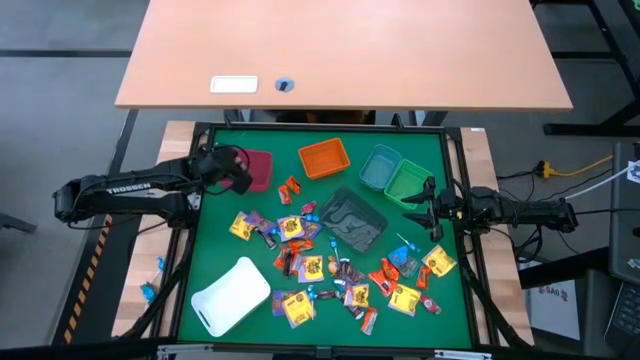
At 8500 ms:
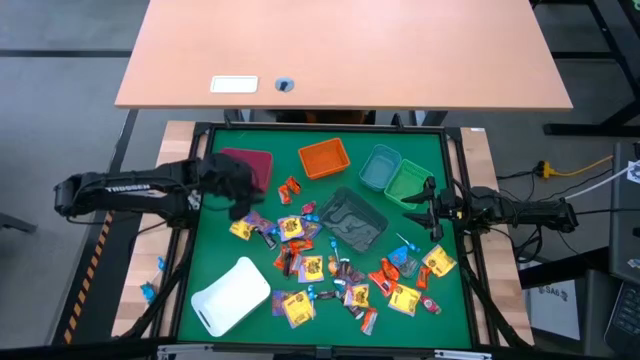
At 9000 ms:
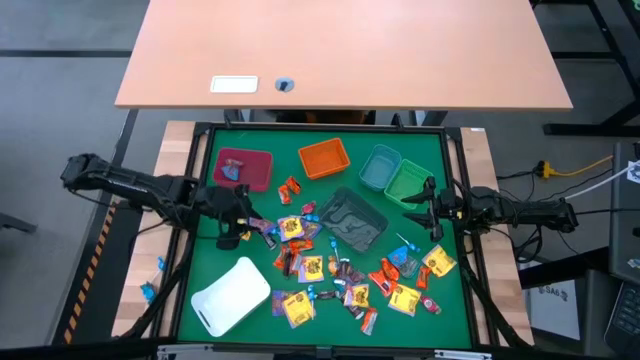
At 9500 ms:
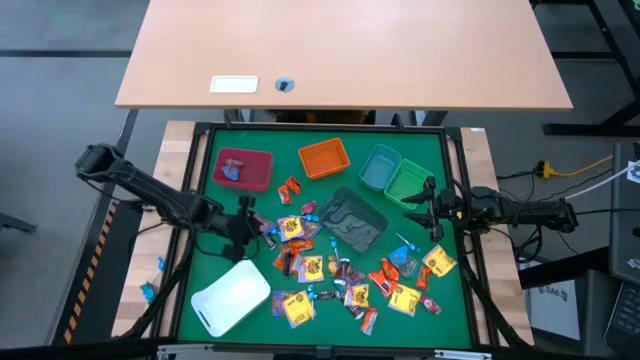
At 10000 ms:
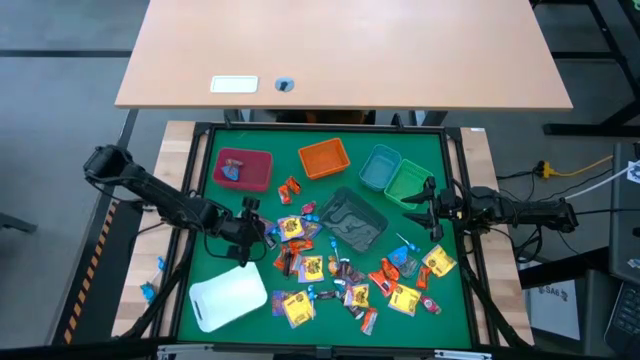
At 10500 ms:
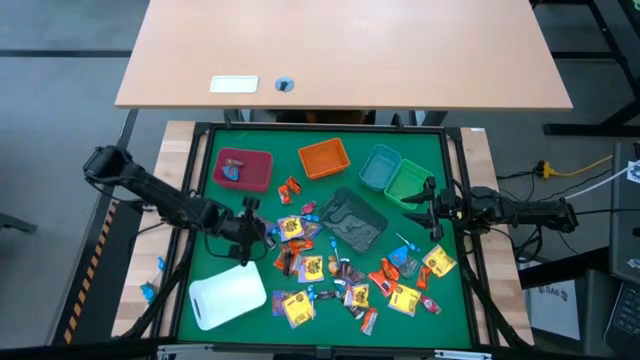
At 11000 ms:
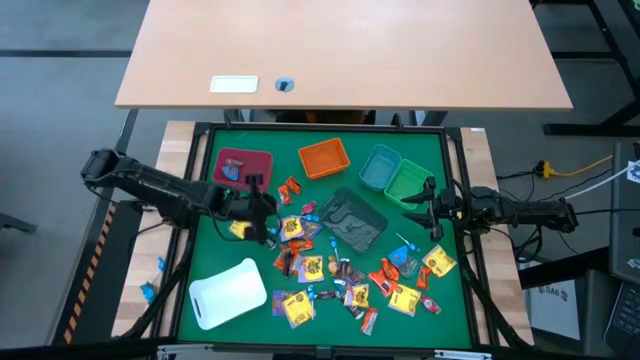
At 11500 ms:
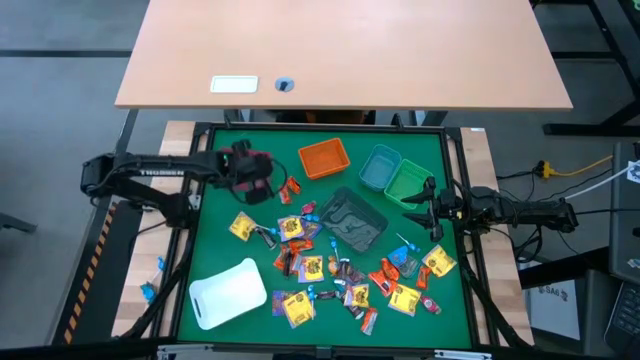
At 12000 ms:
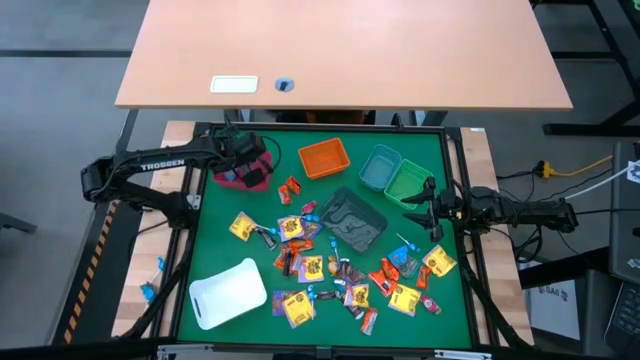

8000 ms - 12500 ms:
Task: Sort candy
Put the purple gummy pack into the red bin

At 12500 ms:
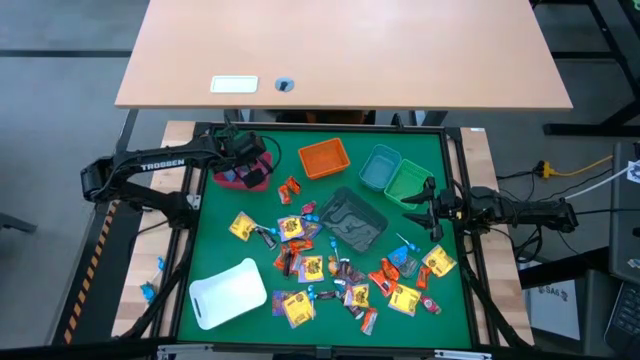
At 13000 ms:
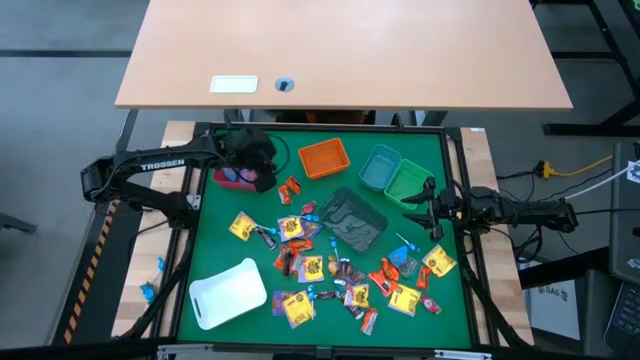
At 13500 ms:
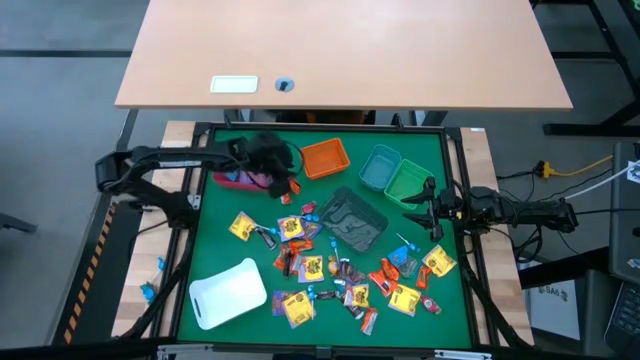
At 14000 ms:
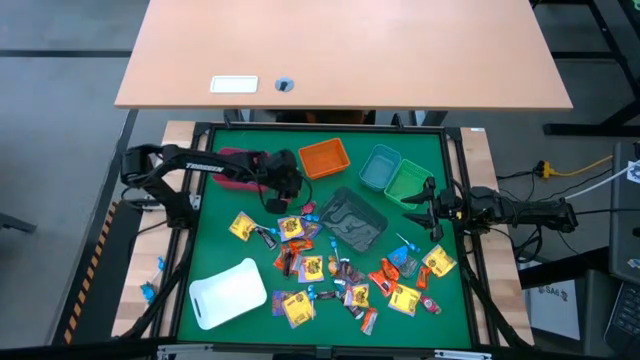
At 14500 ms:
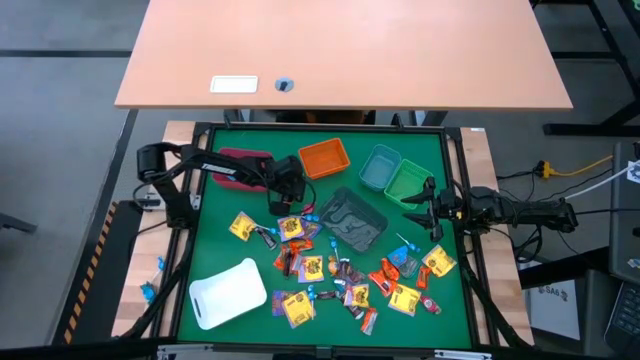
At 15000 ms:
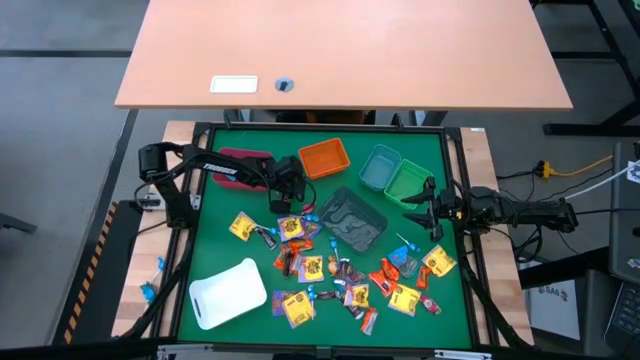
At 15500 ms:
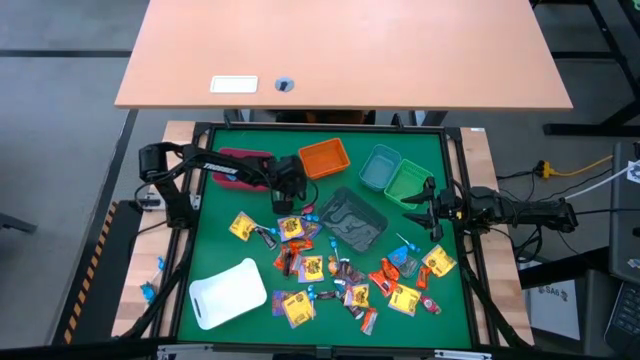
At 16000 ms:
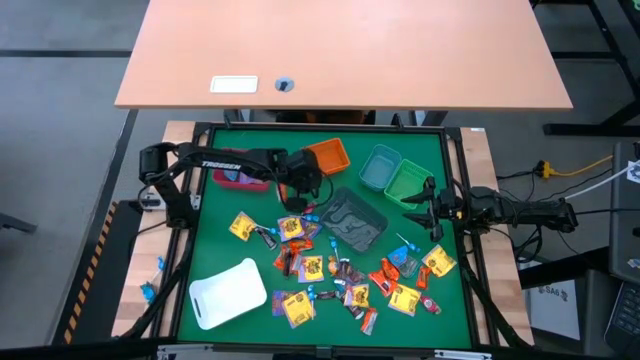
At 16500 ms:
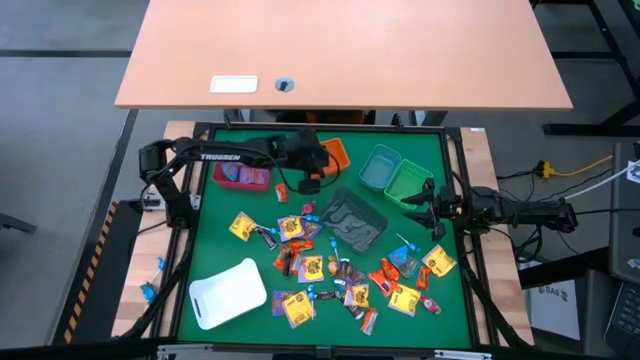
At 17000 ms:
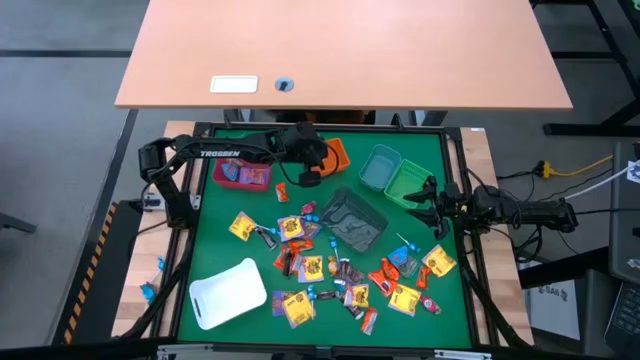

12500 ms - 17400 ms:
Put the orange chocolate into the orange bin

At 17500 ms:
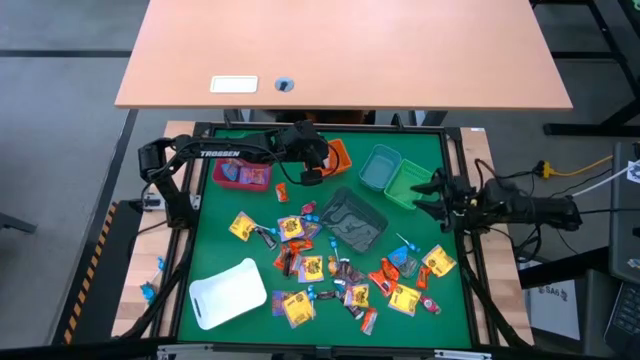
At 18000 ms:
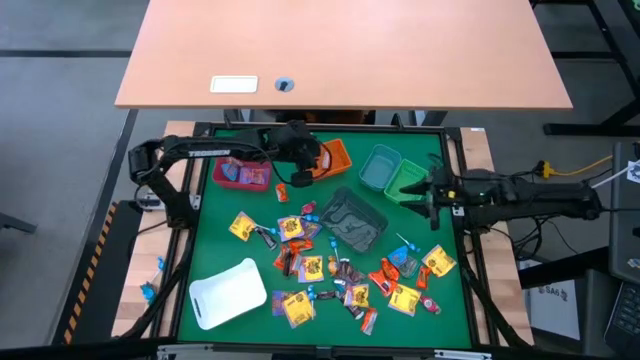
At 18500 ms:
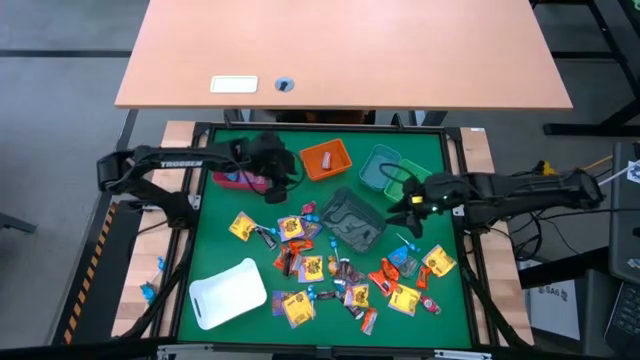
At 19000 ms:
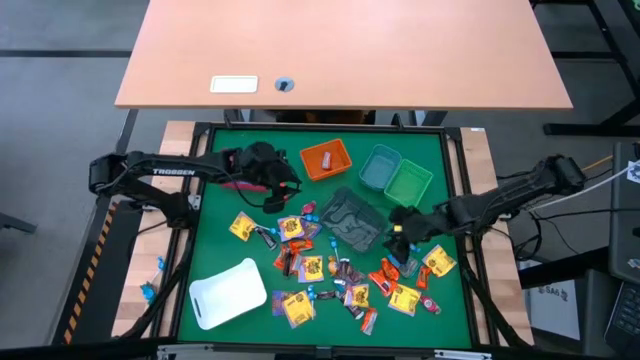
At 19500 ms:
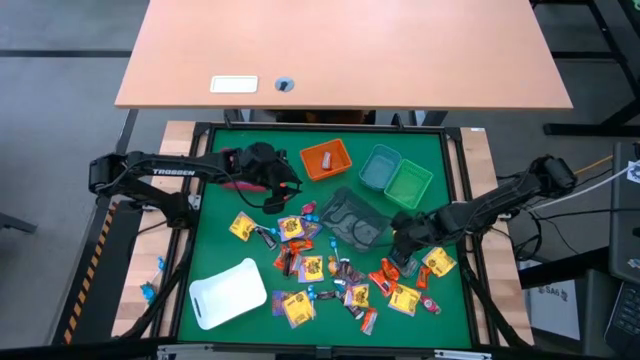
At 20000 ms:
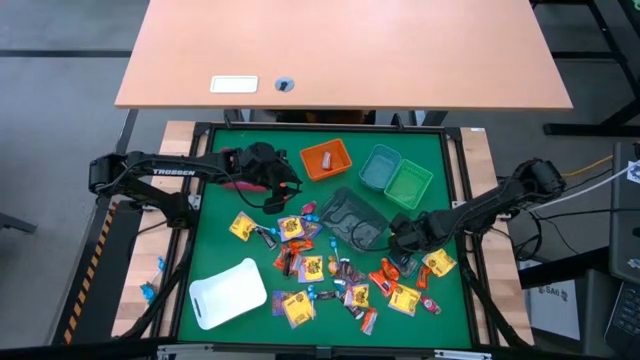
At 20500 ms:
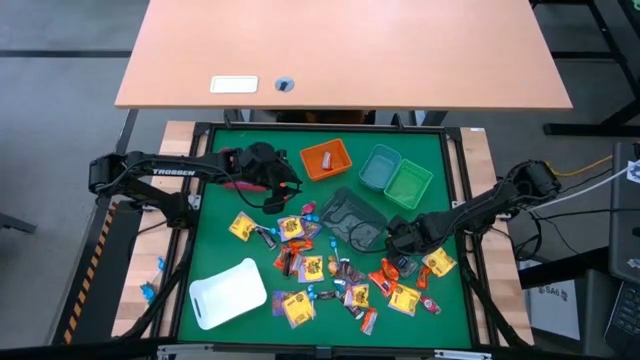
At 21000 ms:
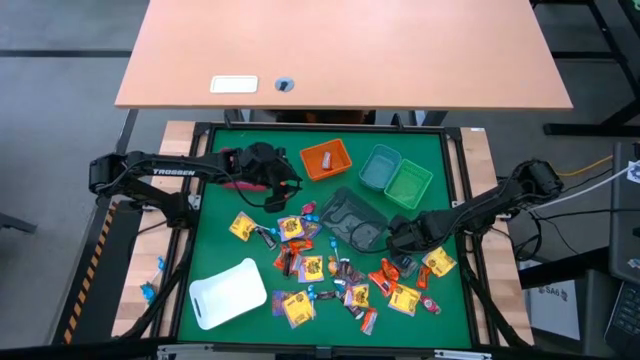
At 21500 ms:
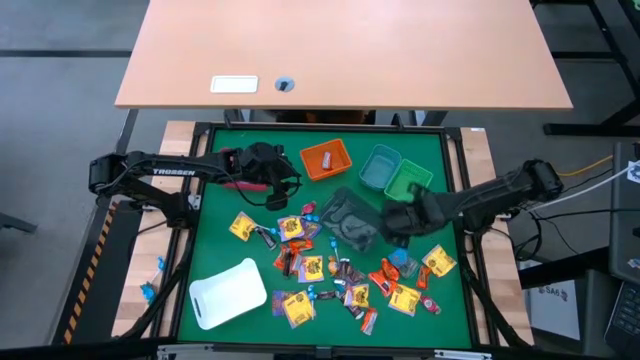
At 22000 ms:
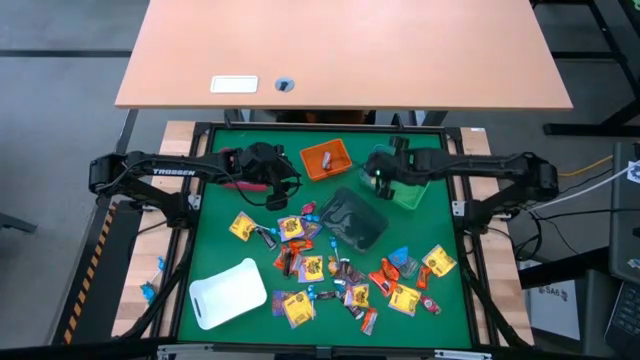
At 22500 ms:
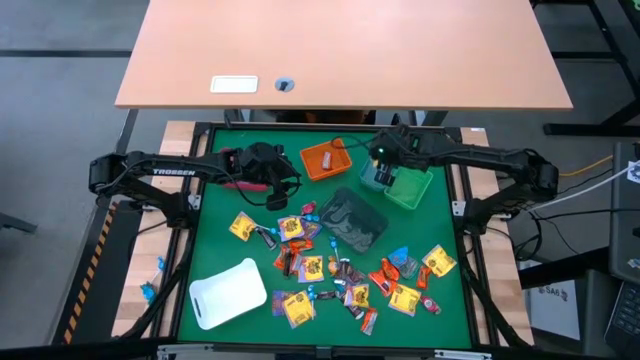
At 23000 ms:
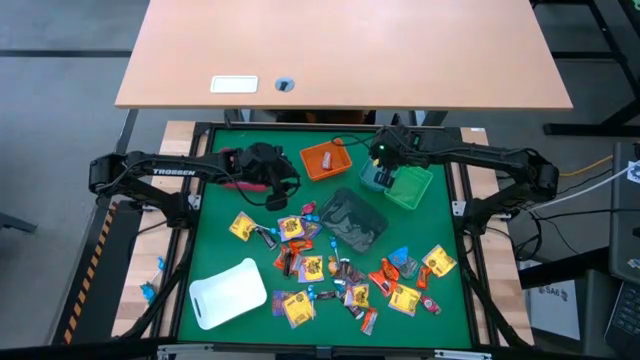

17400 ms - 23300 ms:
Put the blue lollipop into the blue bin

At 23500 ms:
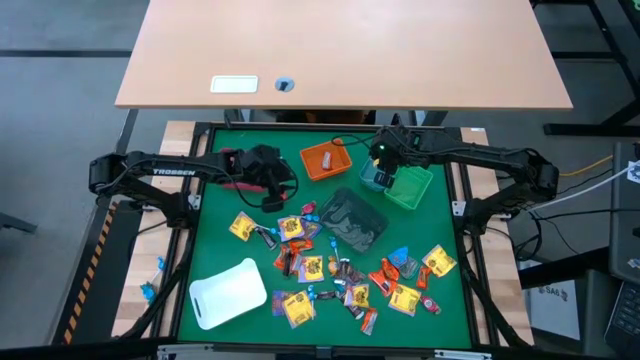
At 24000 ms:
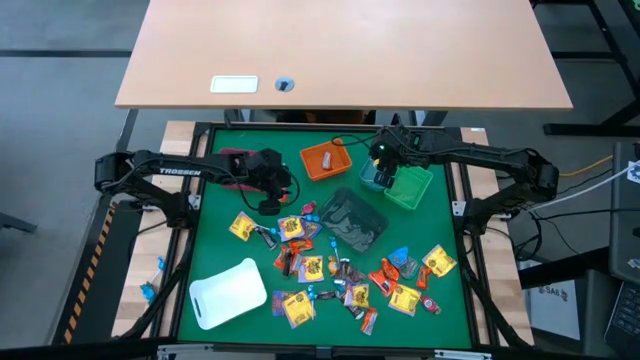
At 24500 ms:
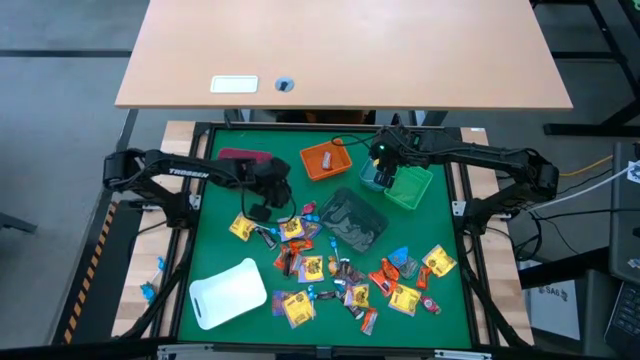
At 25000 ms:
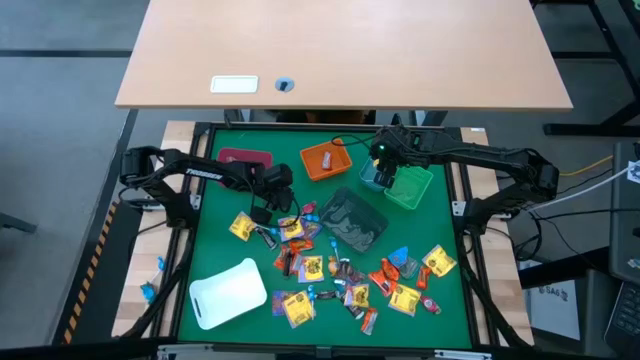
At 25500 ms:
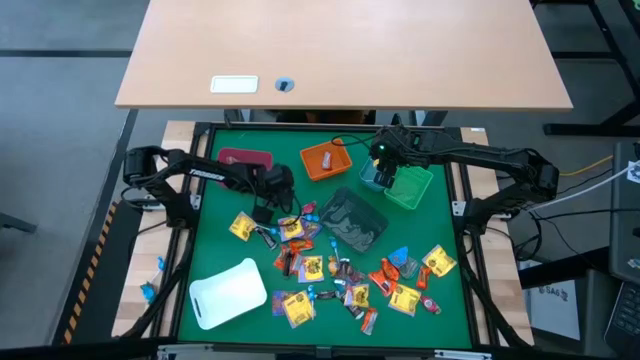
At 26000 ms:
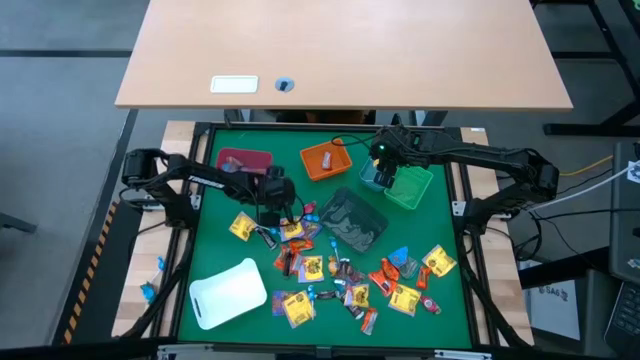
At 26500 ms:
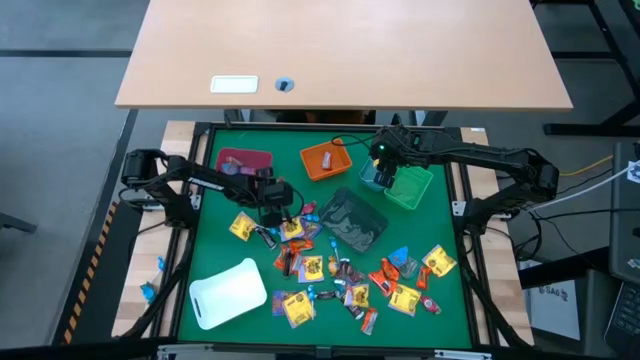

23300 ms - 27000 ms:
Put the orange chocolate into the orange bin

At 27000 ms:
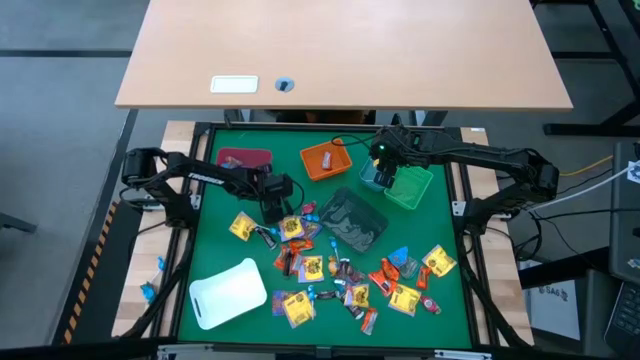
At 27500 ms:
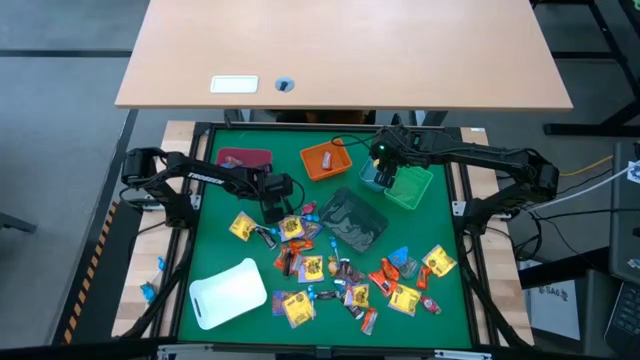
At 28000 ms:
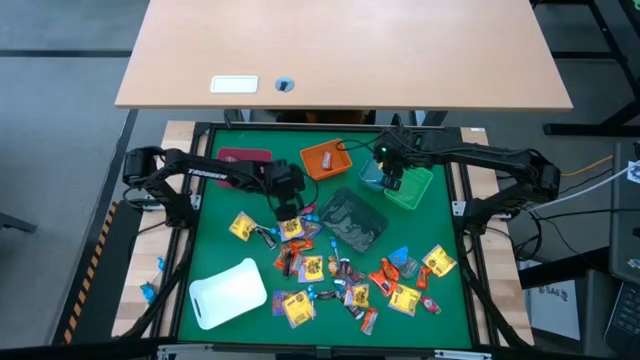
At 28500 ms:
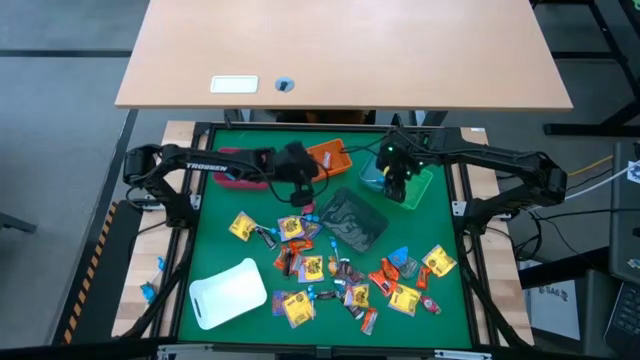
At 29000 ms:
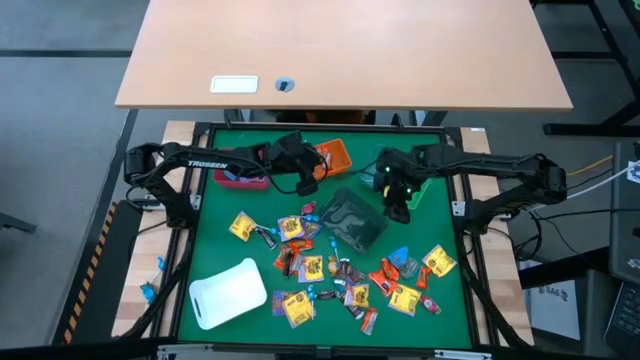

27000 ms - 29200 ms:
Put the orange chocolate into the orange bin
